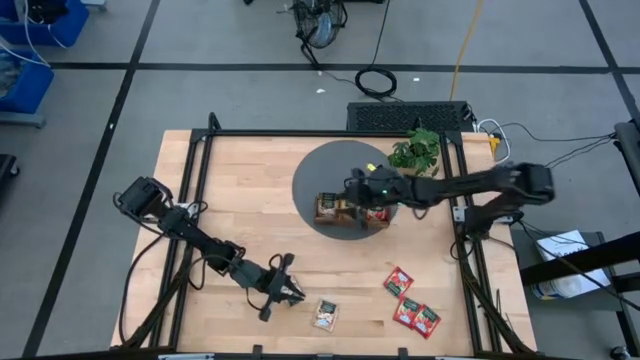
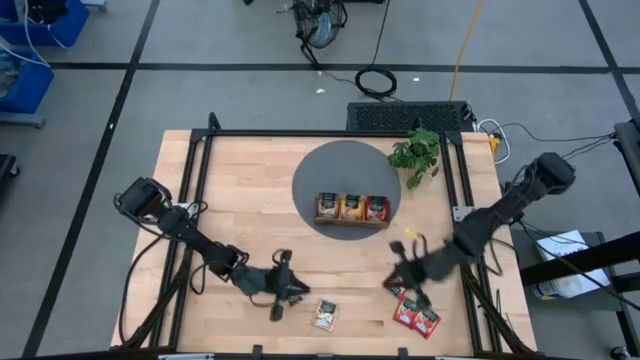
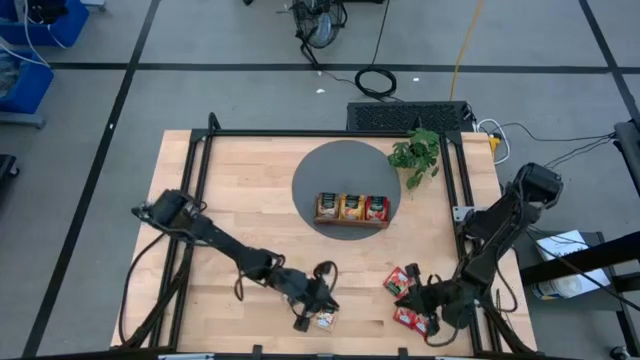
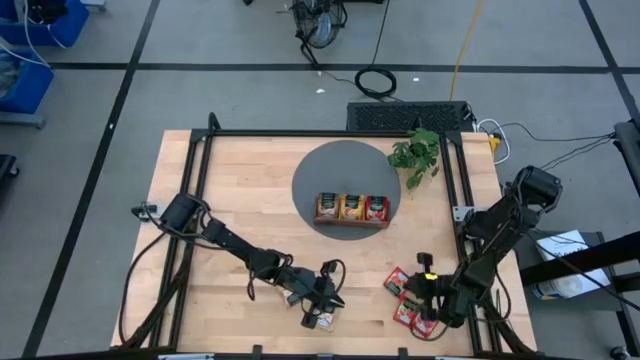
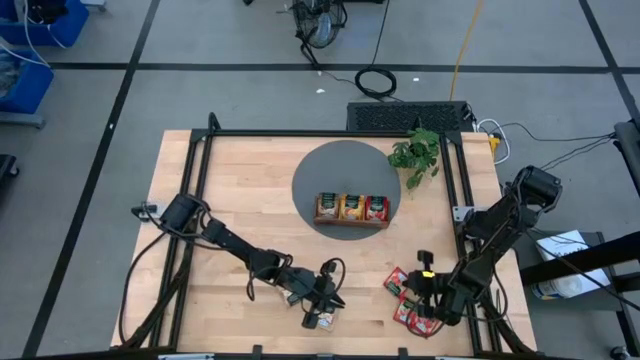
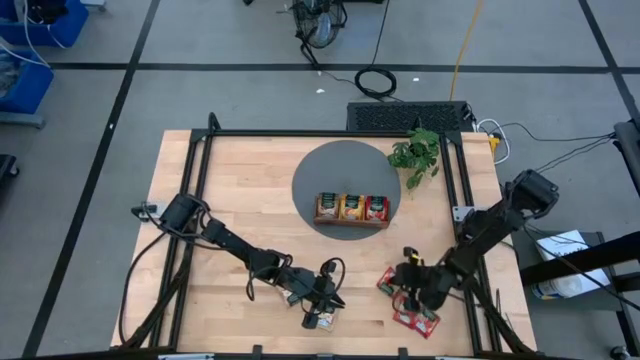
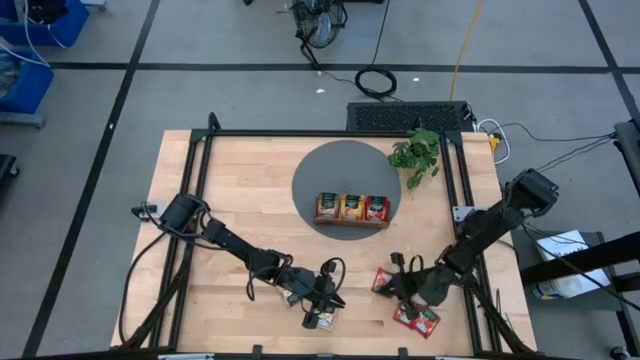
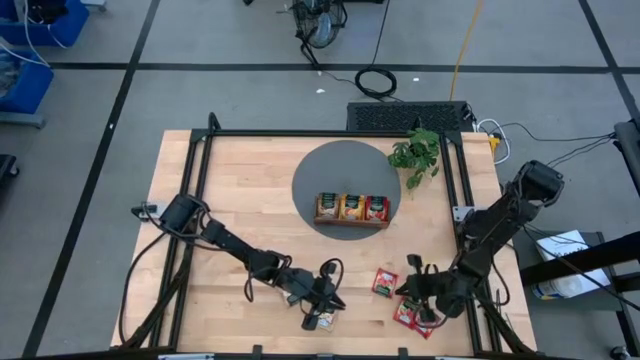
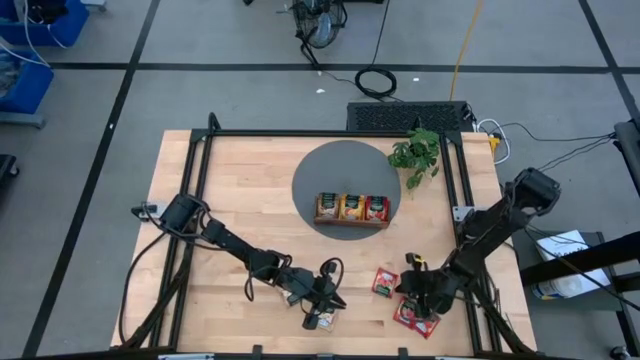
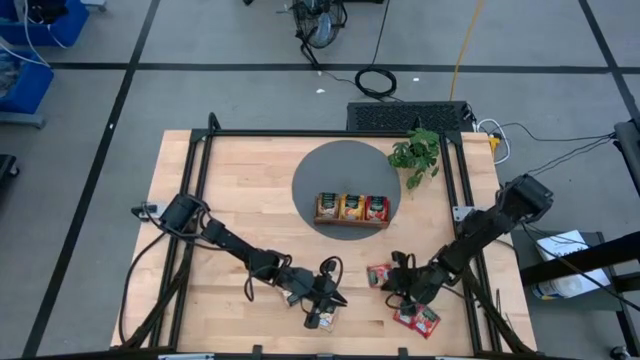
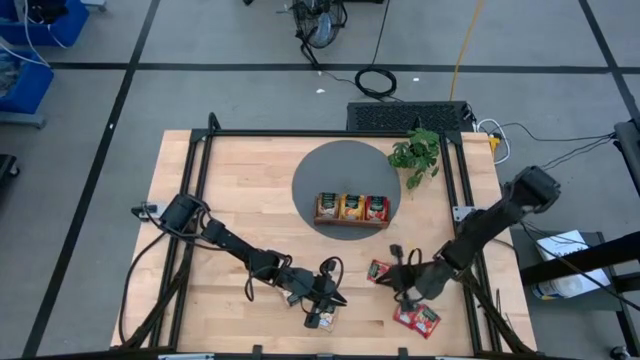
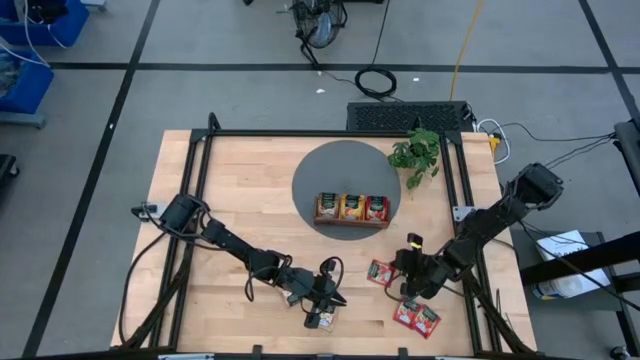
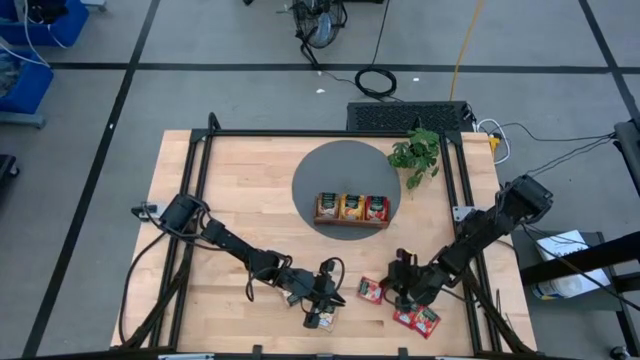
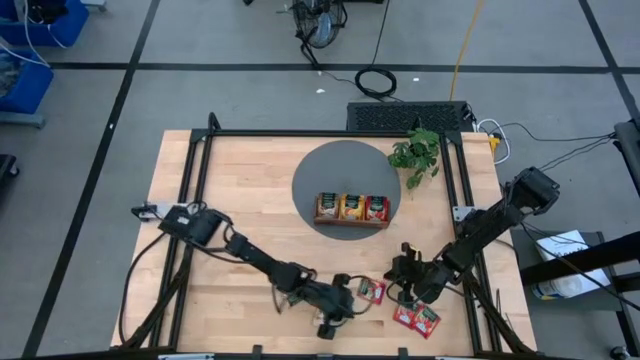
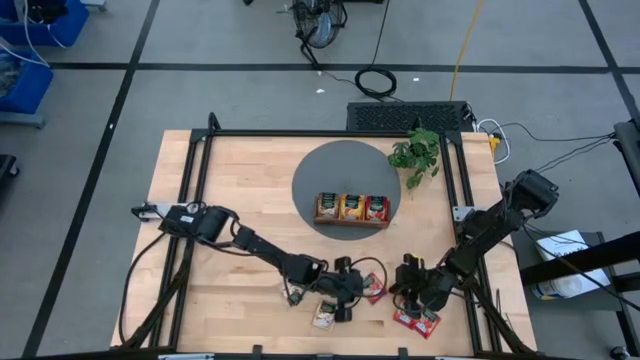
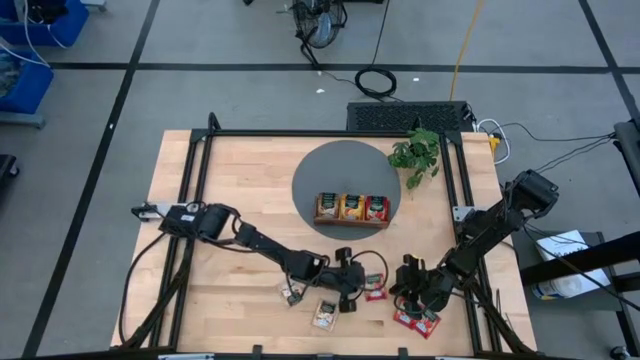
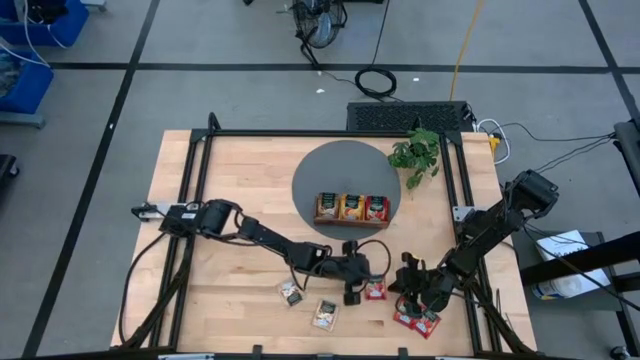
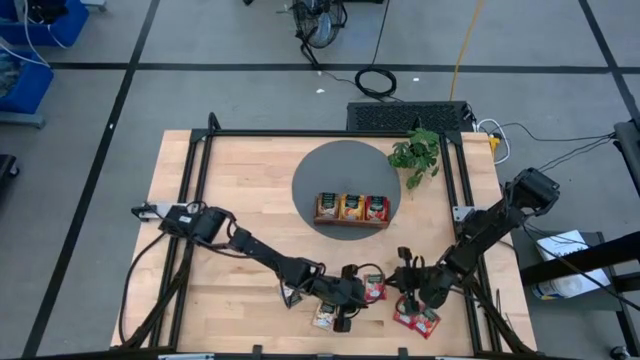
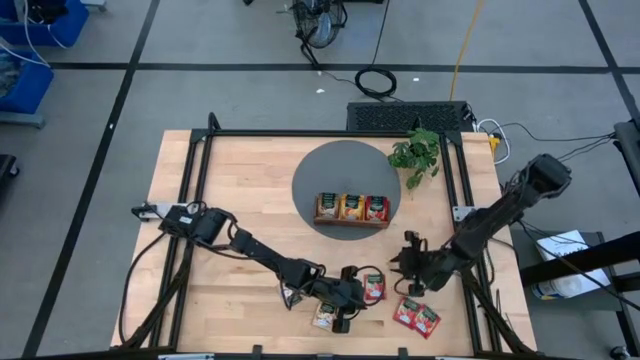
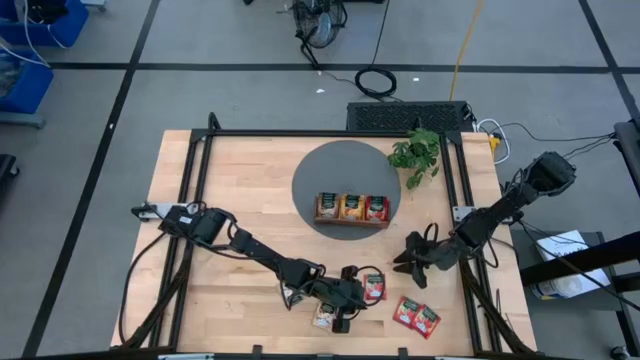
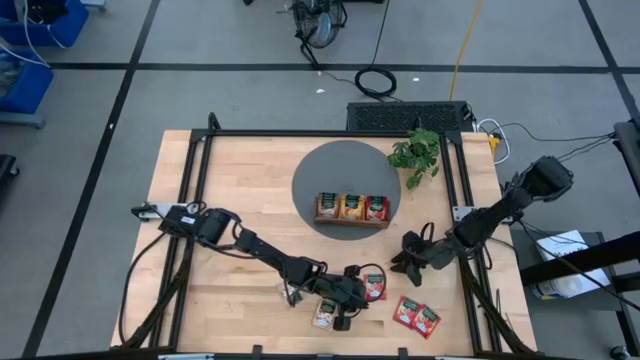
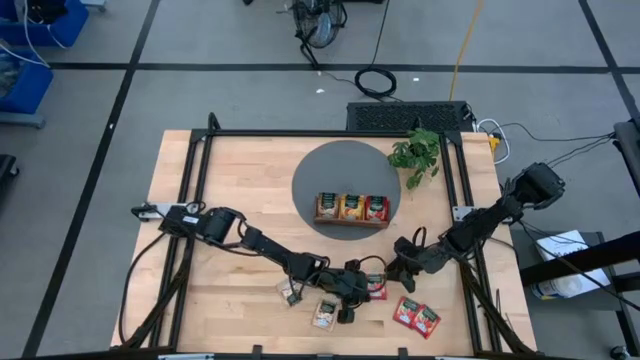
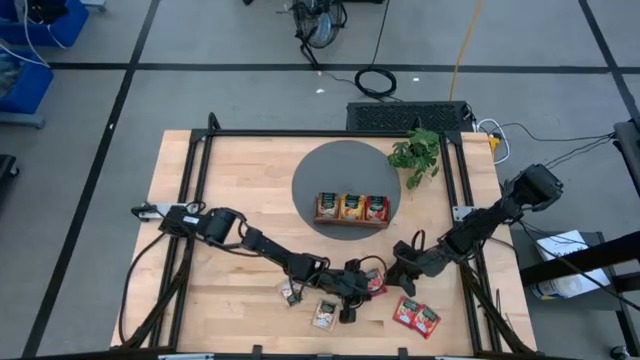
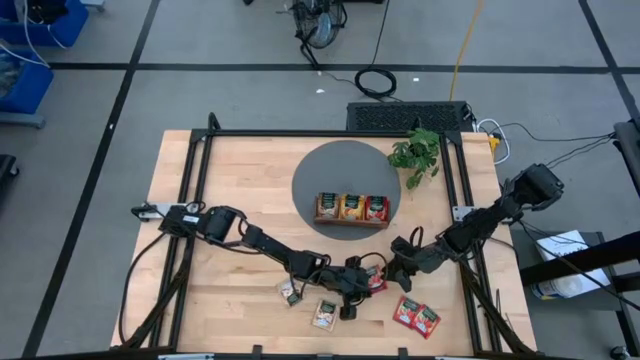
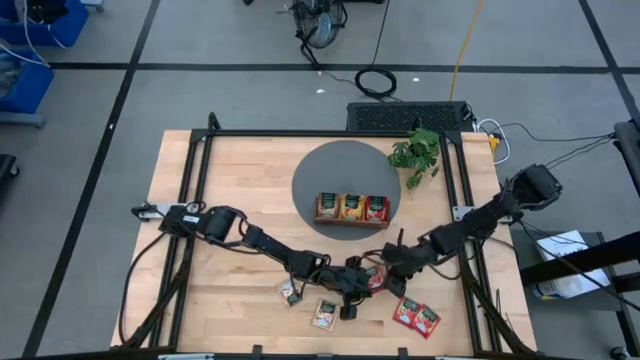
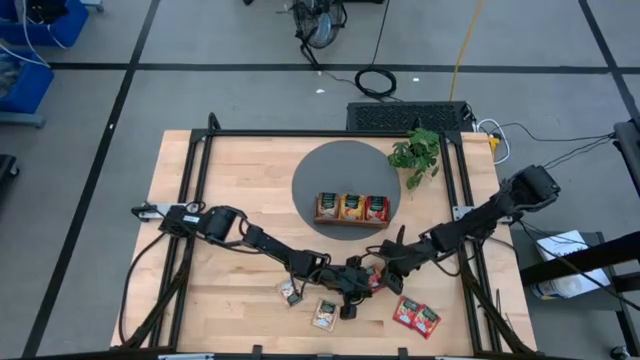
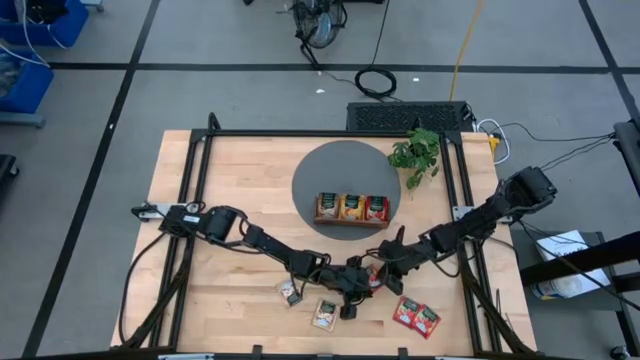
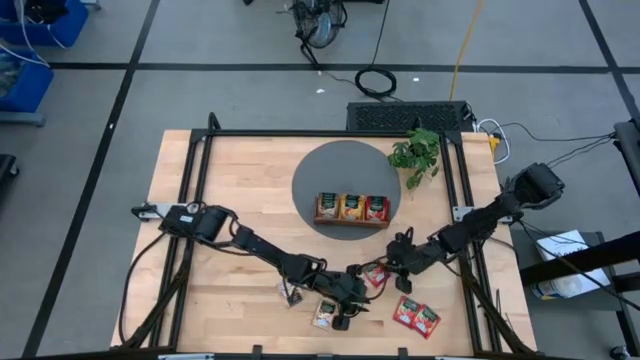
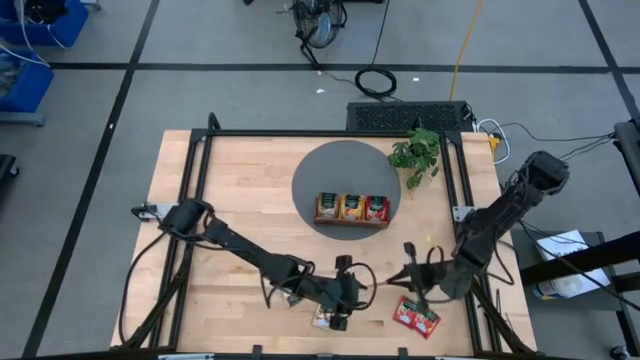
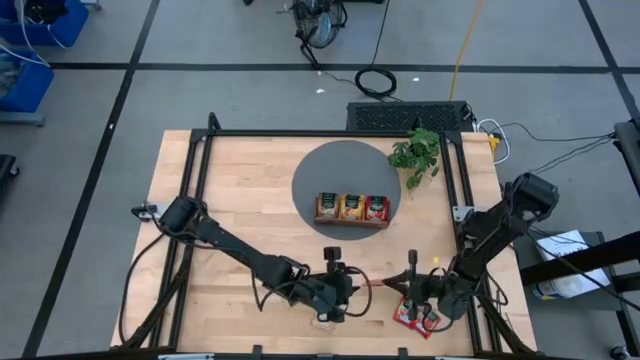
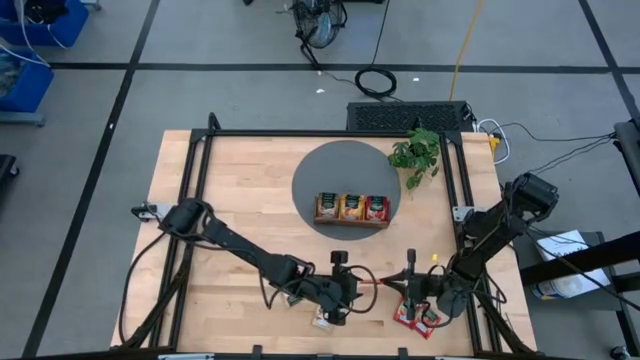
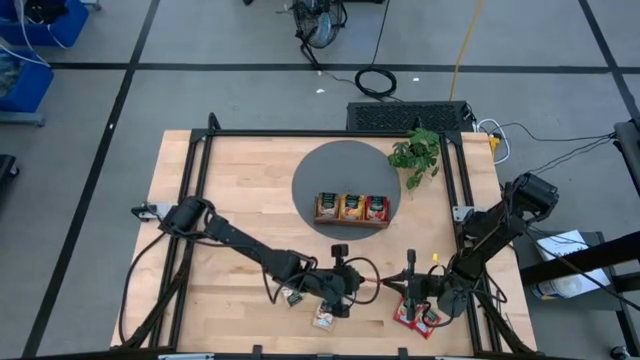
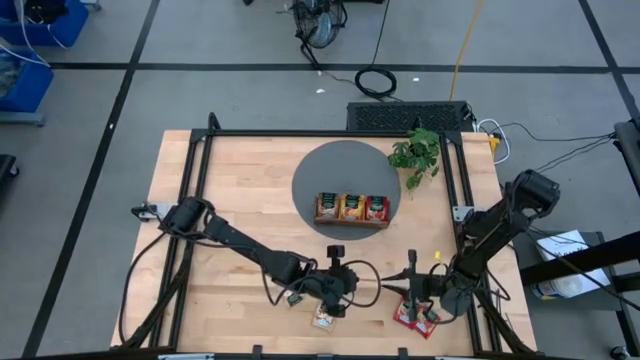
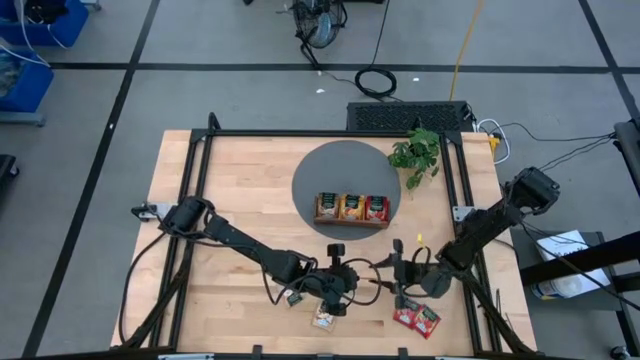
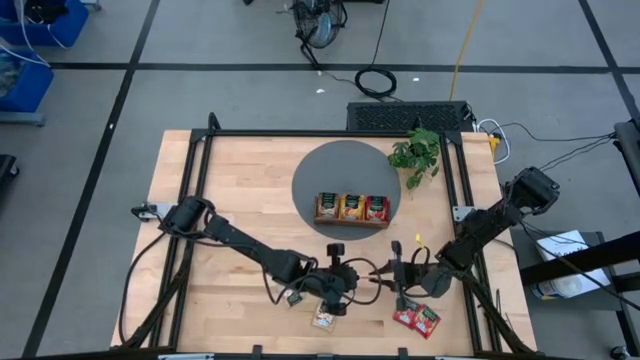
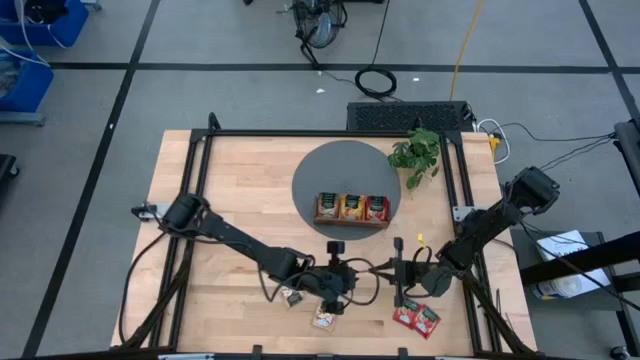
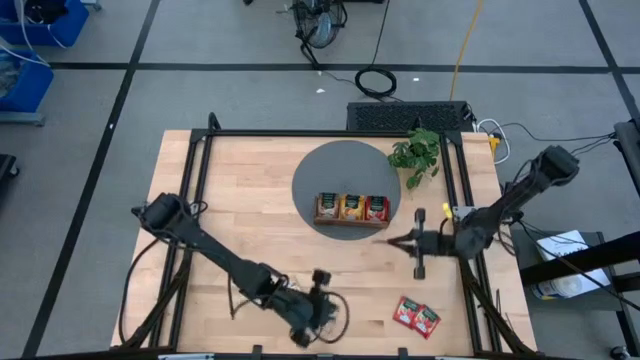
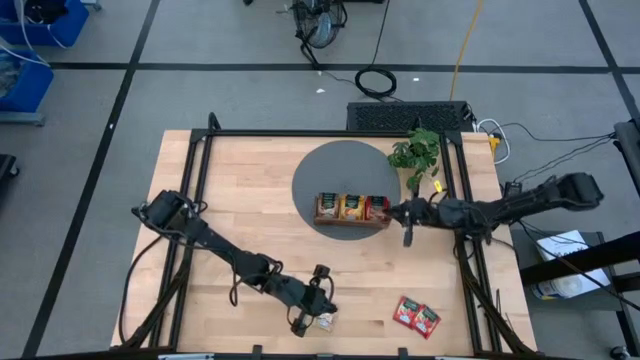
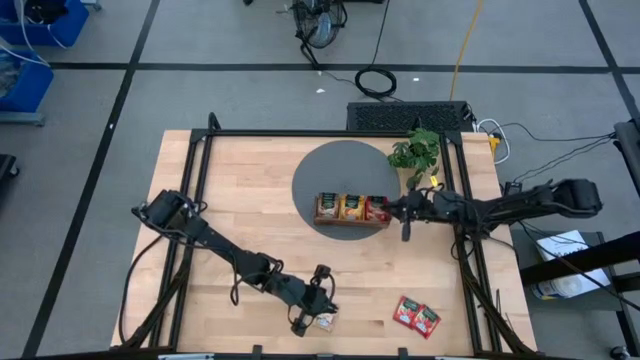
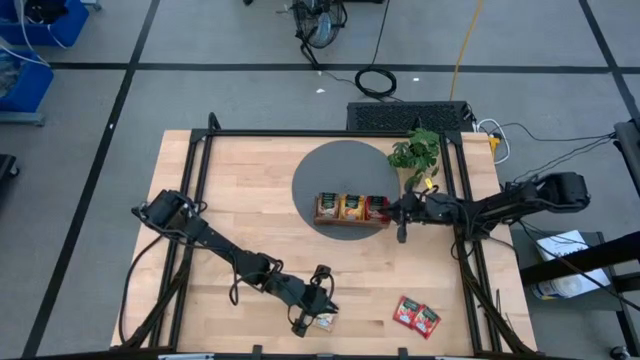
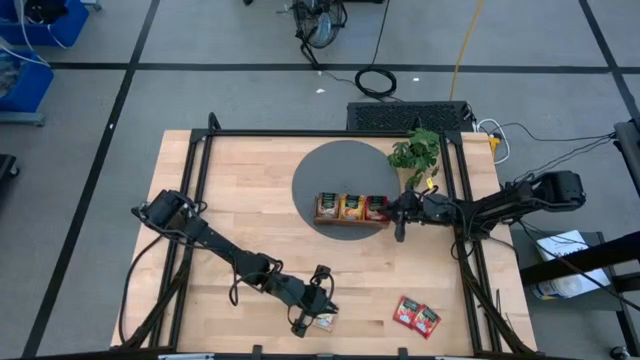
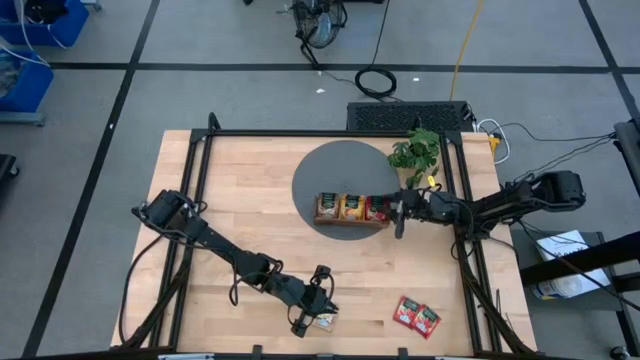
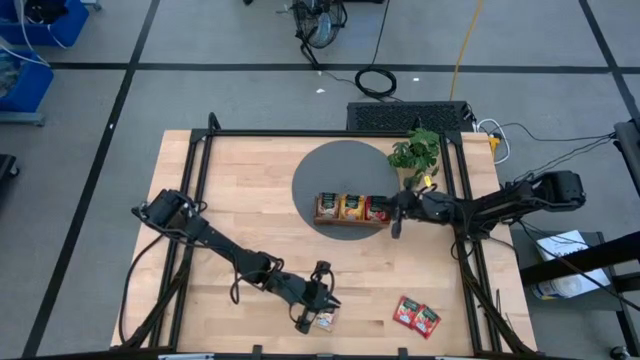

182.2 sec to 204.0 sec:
Task: Pick & Place Tea
Put the red tea bag into the right section of the wooden organiser
